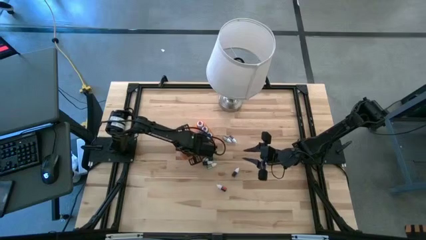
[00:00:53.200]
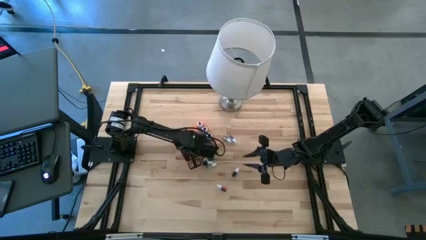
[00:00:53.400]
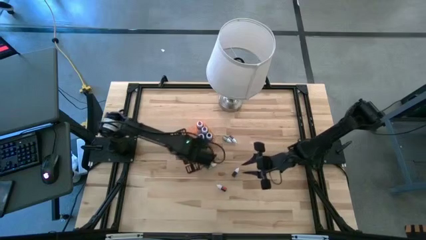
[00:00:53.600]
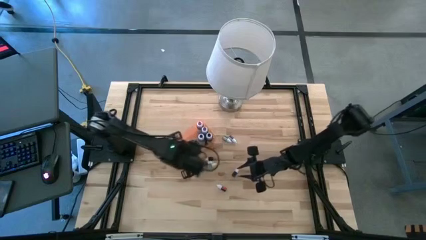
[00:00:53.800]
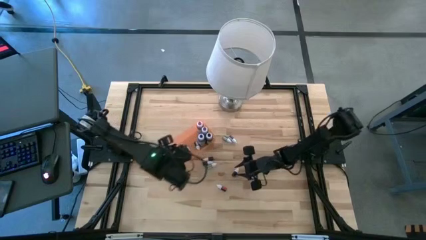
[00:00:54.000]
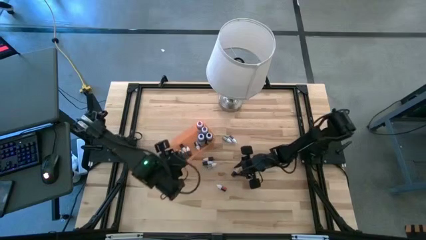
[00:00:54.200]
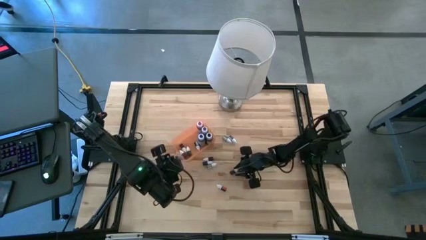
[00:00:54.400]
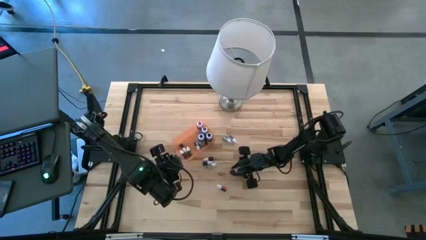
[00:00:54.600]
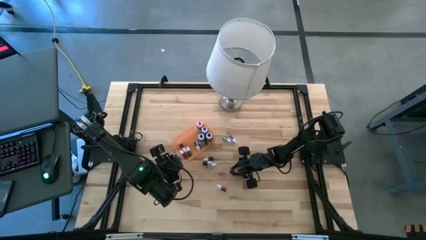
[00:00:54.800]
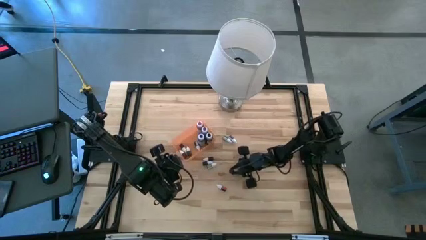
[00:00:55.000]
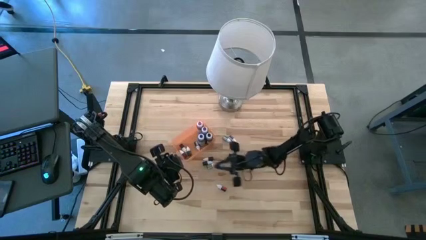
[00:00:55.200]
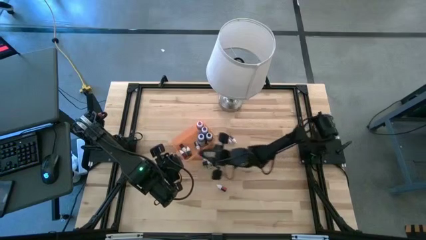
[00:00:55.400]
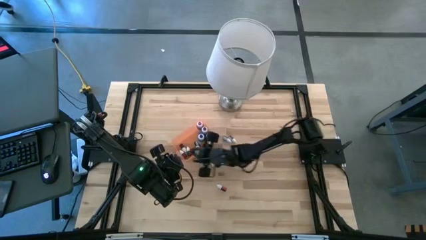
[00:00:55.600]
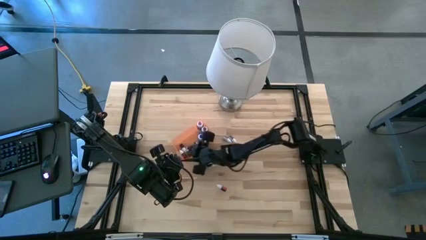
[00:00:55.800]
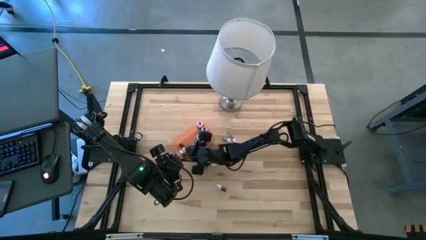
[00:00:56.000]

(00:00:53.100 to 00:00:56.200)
Task: Pick & Place food coloring
Put the bottom small violet food coloring bottle into the bin

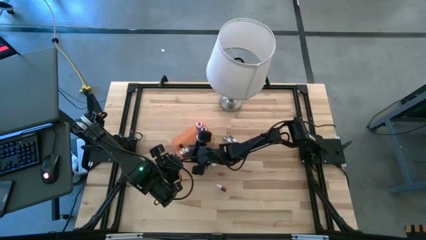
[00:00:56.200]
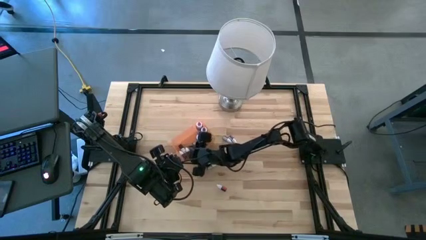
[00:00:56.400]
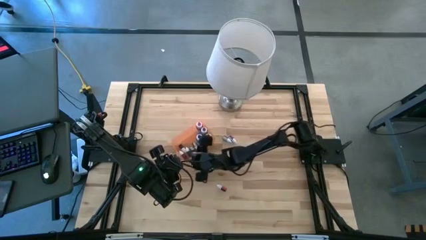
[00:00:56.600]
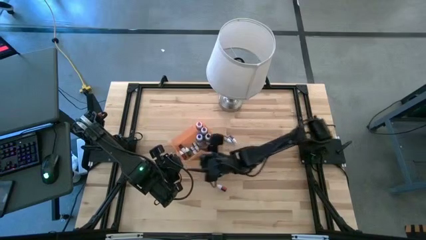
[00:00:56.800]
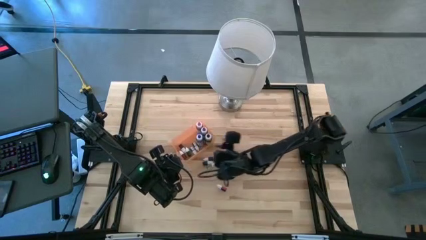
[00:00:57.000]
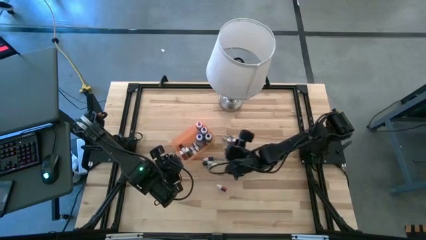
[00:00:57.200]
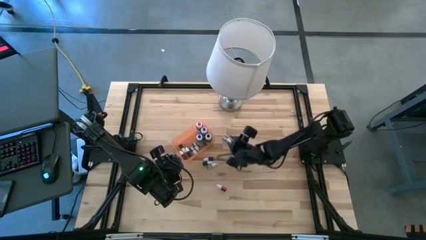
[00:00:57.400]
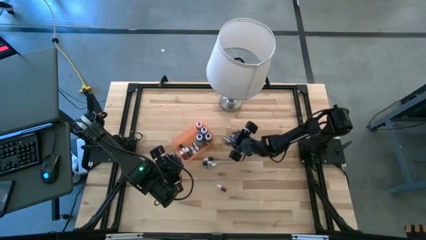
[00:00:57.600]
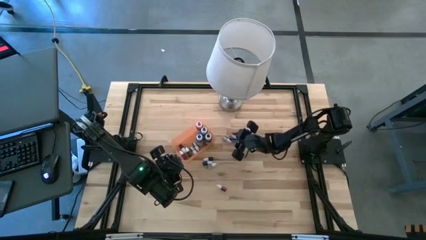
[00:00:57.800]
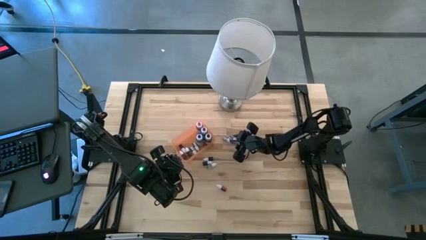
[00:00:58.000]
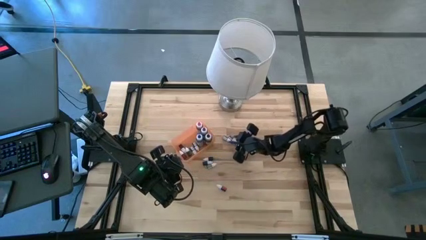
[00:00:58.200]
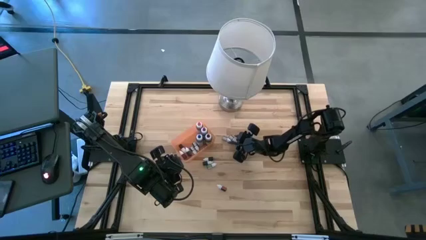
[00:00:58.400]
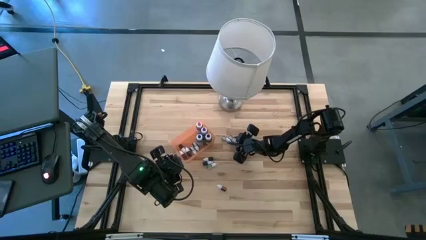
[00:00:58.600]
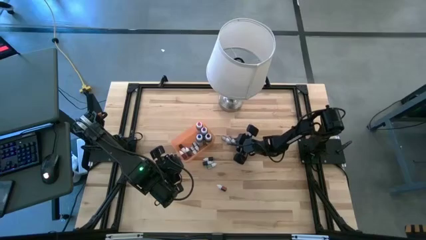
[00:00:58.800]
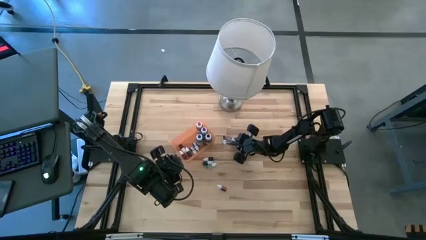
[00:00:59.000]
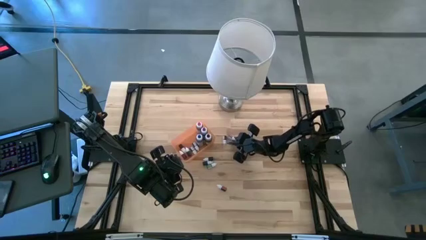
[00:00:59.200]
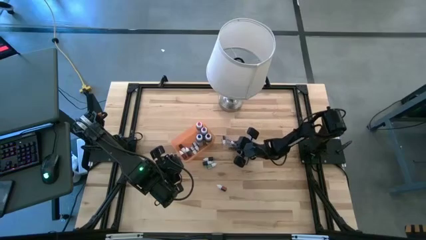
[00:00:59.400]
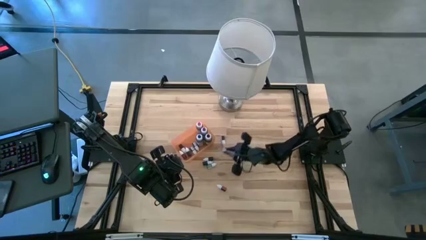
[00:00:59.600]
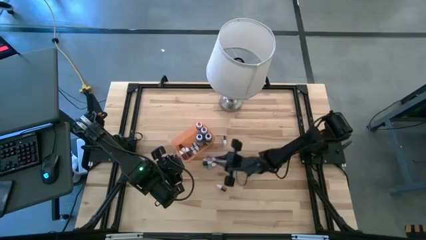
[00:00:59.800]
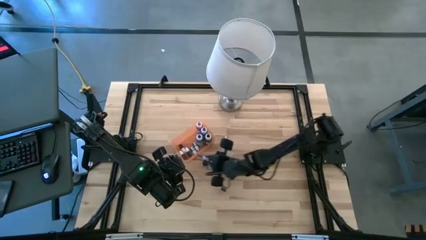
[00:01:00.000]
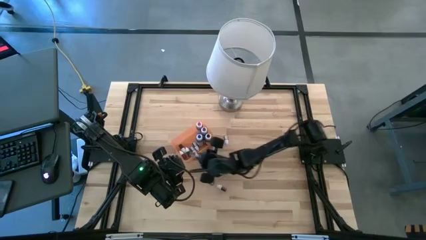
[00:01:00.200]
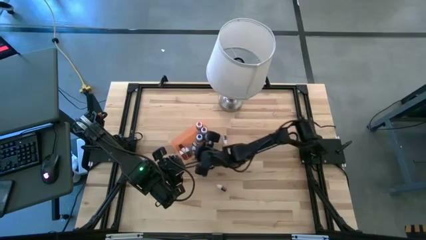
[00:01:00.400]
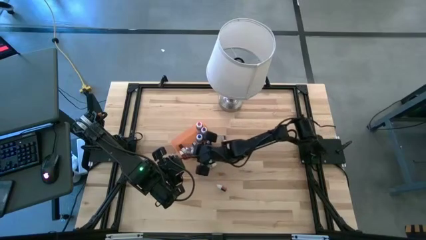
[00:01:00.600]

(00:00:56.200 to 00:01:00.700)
Put the small violet food coloring bottle into the bin

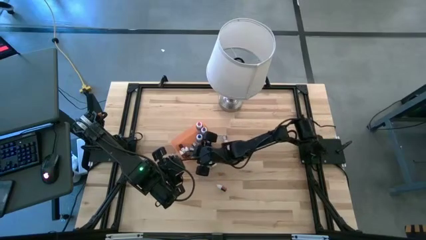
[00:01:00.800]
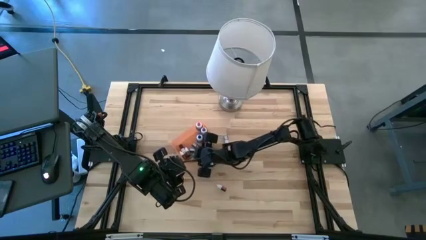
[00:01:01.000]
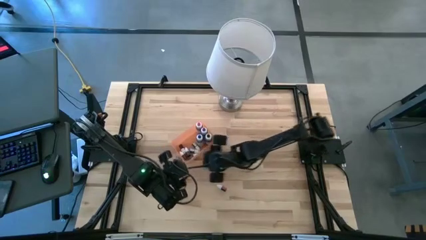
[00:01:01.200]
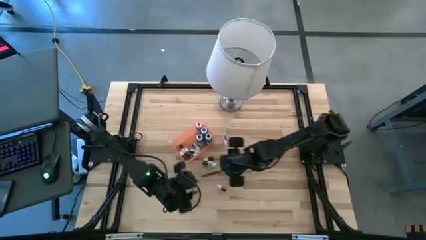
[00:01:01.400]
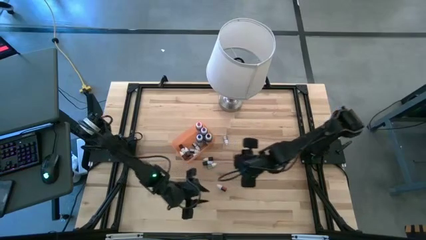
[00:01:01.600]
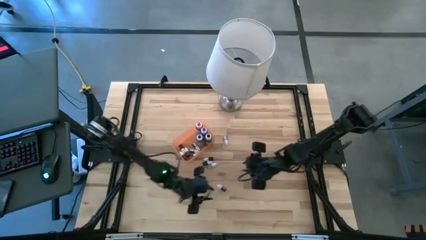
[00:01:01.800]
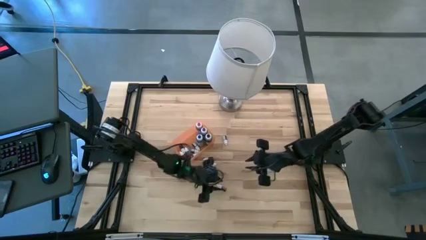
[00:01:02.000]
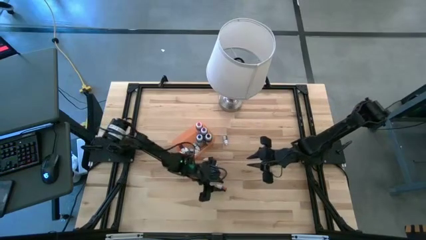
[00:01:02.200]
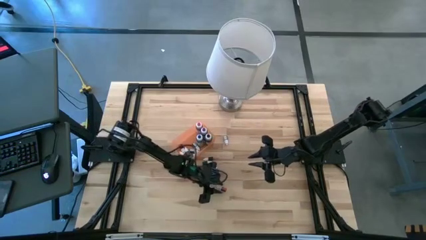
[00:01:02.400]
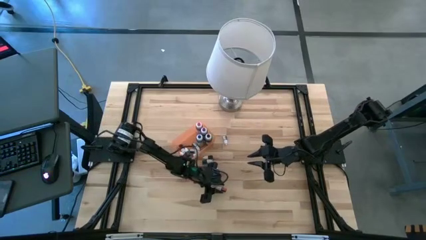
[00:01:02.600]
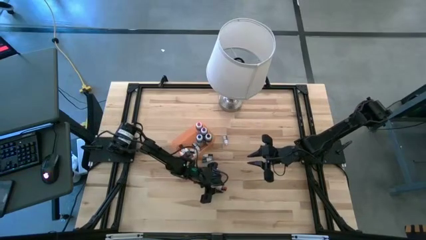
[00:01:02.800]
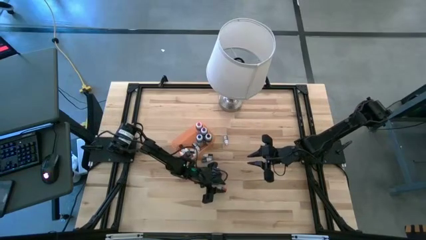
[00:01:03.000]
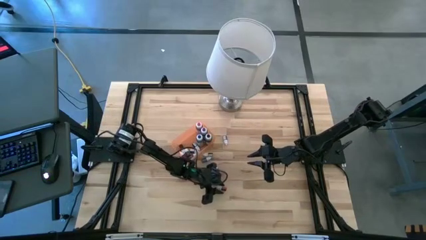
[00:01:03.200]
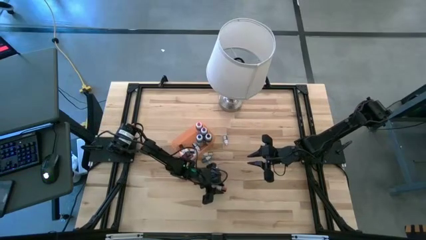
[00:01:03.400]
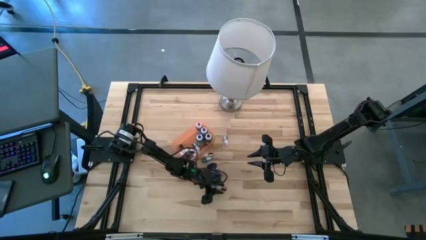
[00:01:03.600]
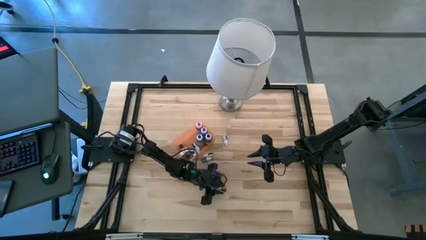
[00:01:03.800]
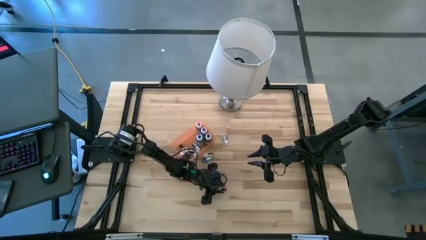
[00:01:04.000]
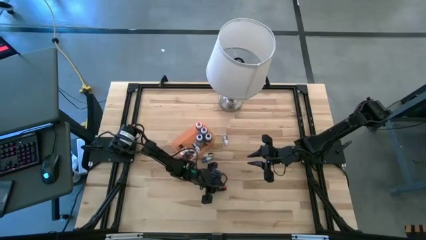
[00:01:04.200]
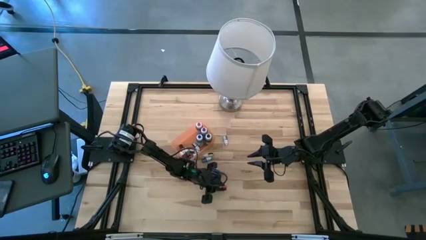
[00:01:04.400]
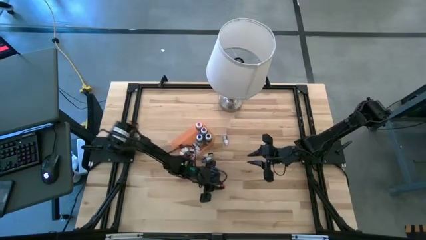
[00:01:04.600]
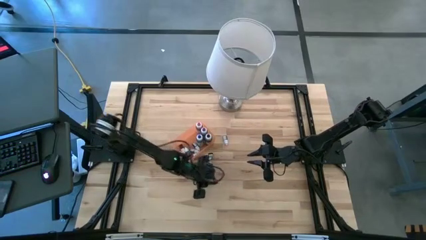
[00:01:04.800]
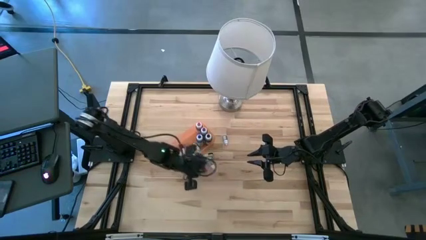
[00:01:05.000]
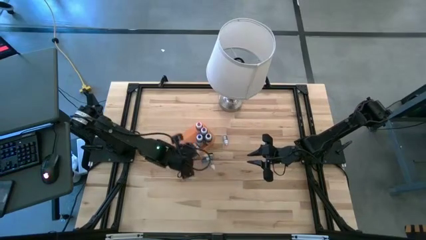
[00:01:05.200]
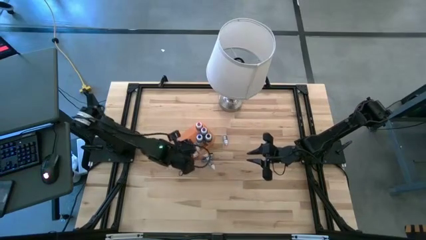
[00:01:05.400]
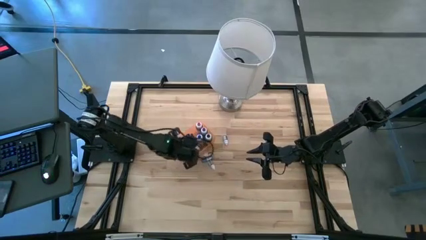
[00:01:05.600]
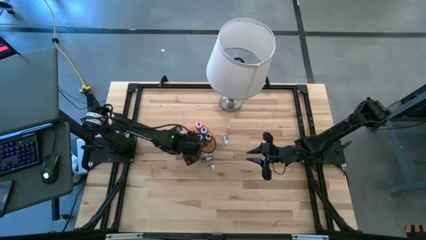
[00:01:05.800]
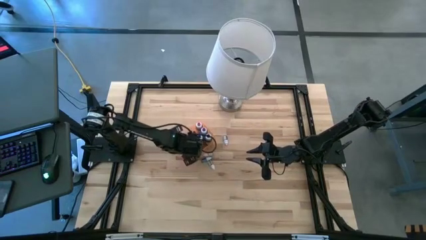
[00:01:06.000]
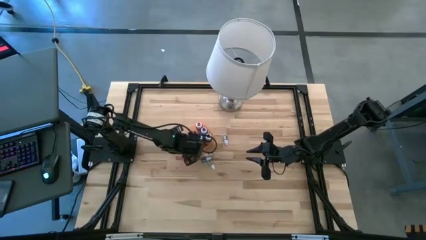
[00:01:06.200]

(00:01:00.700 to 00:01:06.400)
Put the small red food coloring bottle into the bin

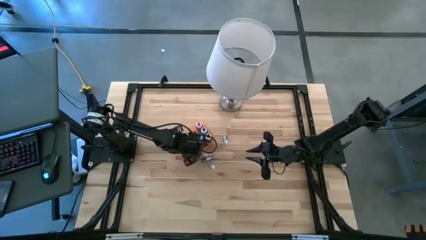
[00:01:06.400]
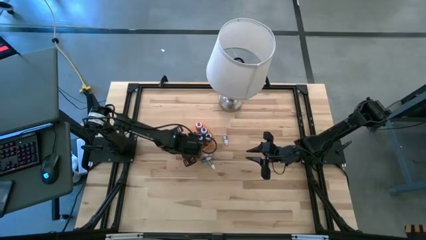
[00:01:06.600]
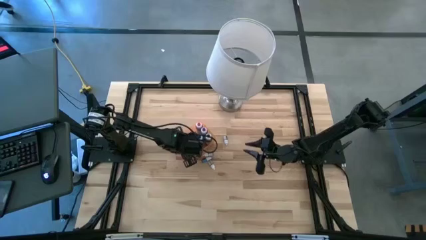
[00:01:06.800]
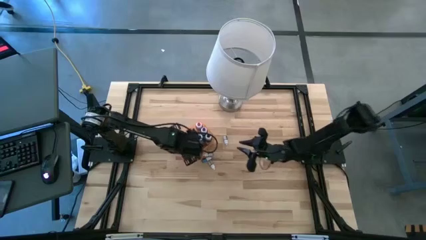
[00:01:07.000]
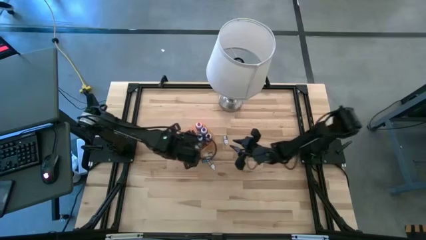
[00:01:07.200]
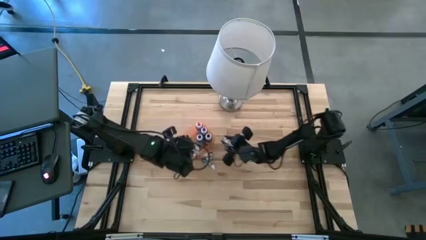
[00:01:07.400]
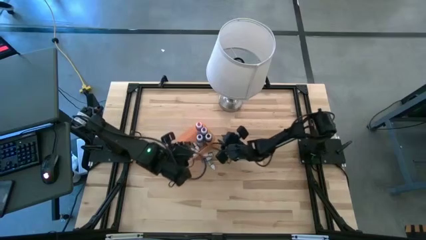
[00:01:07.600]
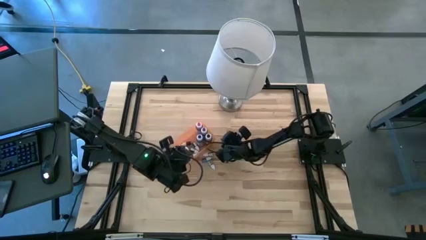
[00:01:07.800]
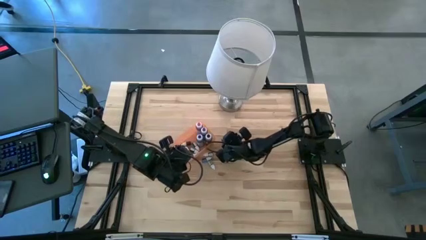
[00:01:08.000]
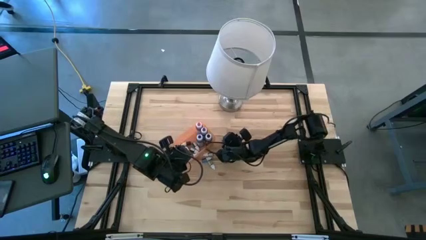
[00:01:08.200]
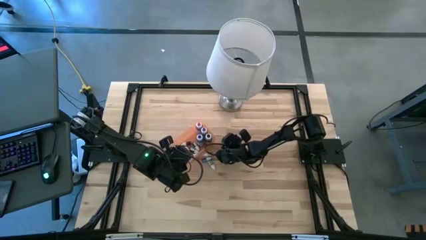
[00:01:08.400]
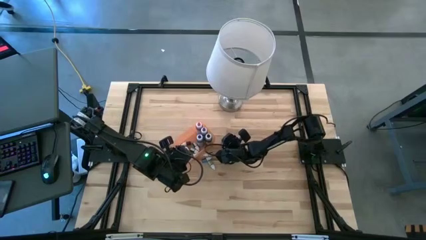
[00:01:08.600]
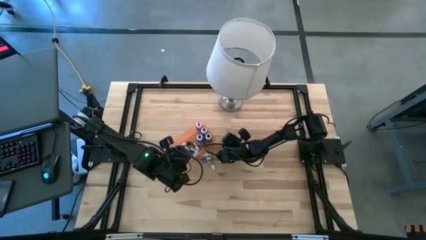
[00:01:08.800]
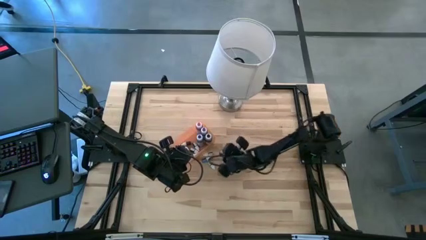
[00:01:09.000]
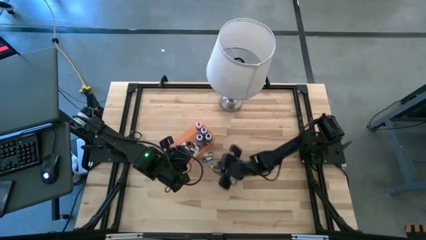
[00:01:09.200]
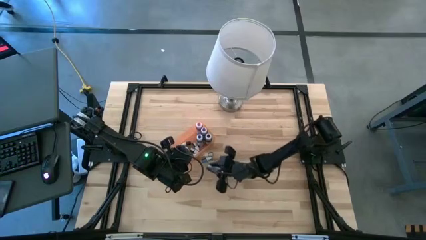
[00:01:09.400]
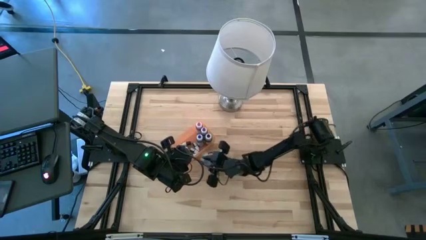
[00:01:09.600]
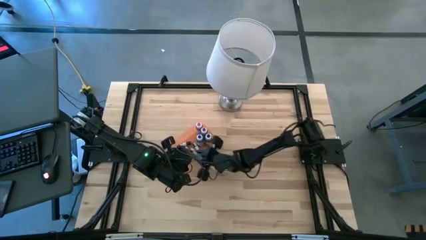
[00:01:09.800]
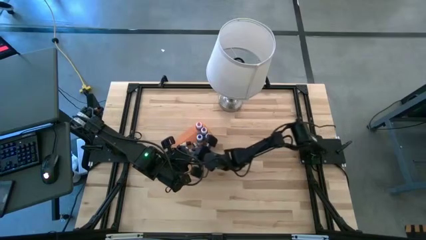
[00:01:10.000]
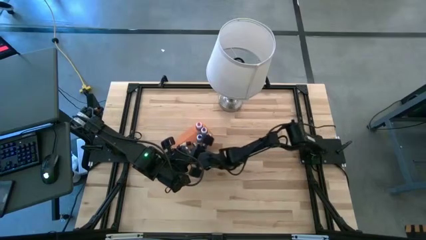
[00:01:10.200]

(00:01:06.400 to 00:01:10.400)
Put the small black food coloring bottle bottle into the bin
